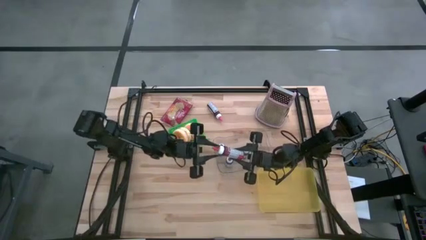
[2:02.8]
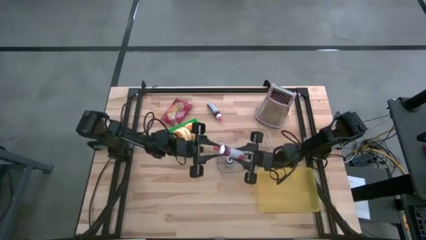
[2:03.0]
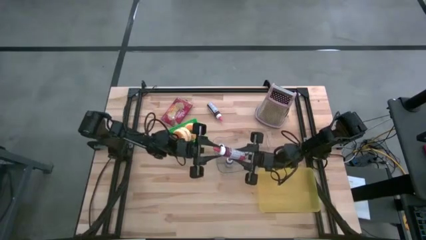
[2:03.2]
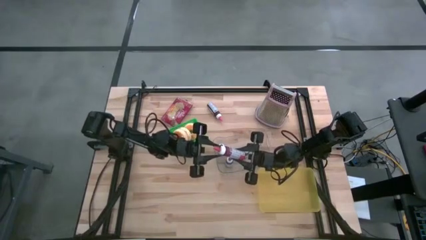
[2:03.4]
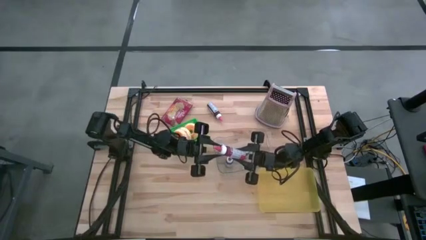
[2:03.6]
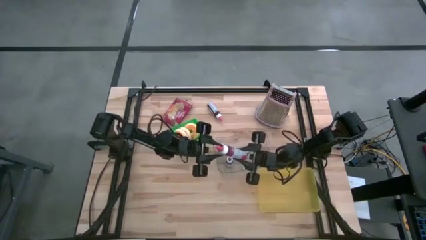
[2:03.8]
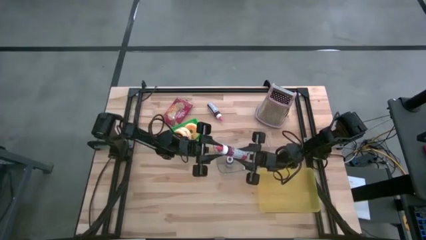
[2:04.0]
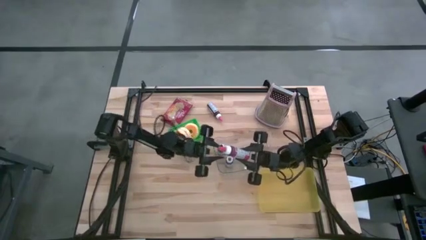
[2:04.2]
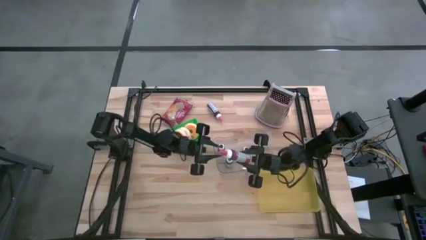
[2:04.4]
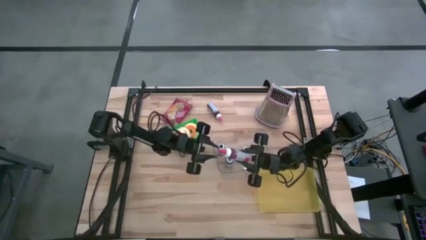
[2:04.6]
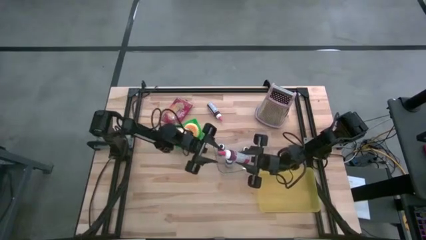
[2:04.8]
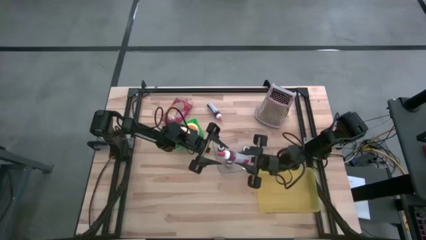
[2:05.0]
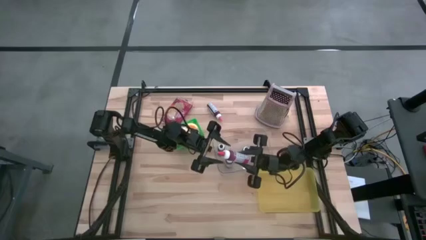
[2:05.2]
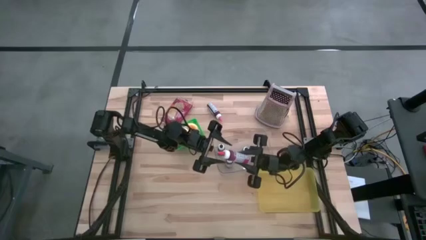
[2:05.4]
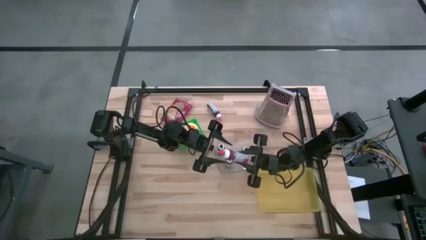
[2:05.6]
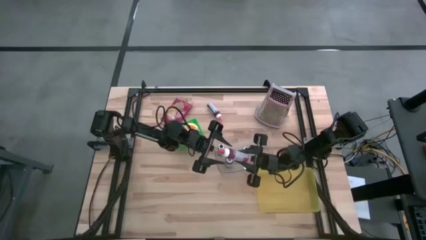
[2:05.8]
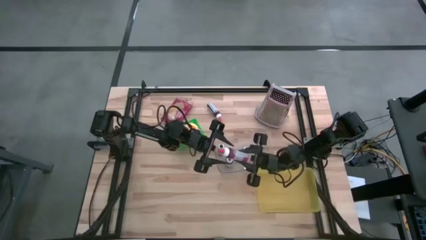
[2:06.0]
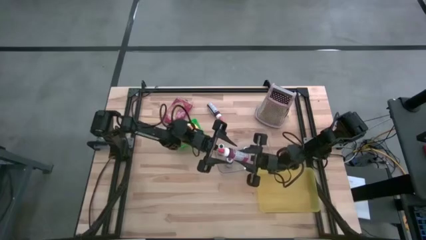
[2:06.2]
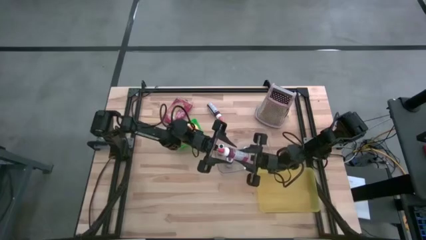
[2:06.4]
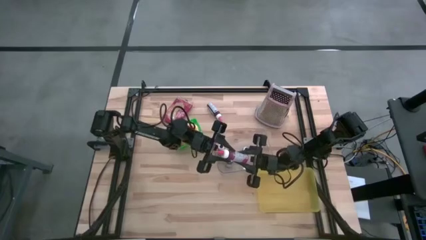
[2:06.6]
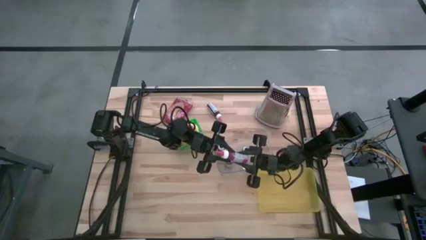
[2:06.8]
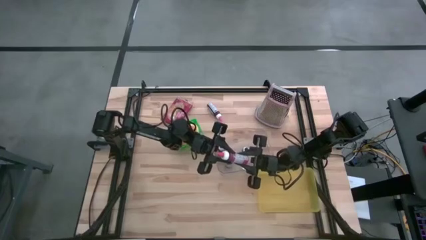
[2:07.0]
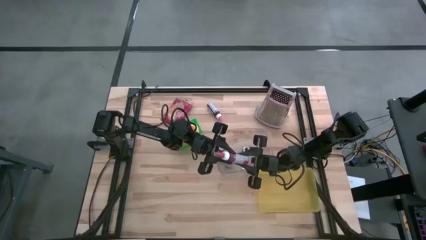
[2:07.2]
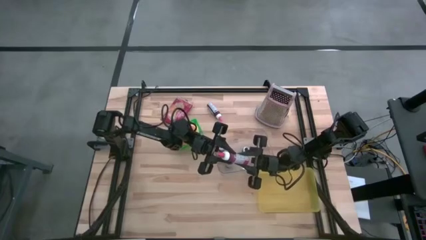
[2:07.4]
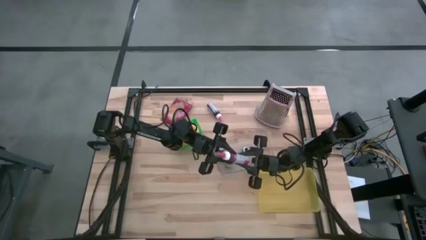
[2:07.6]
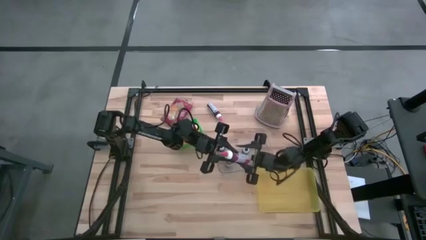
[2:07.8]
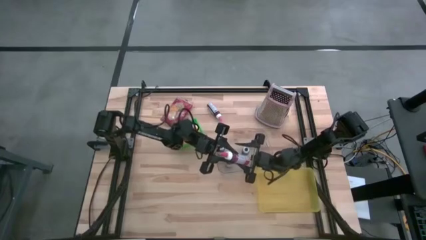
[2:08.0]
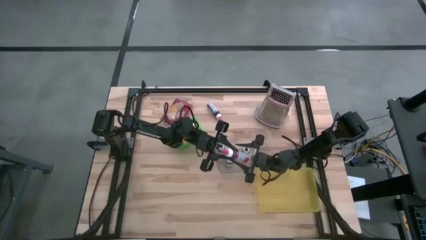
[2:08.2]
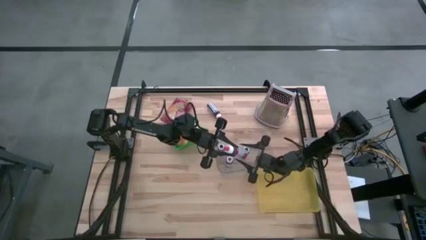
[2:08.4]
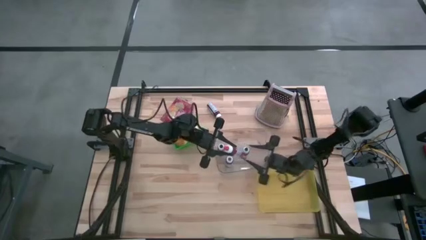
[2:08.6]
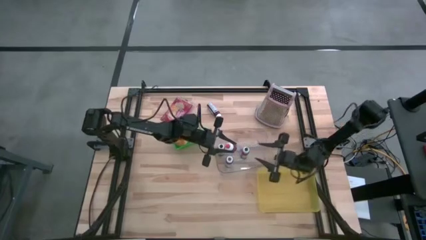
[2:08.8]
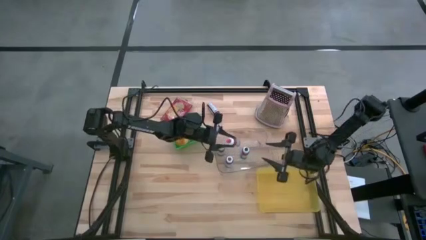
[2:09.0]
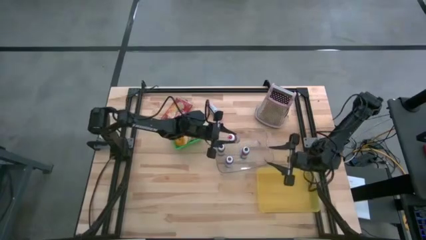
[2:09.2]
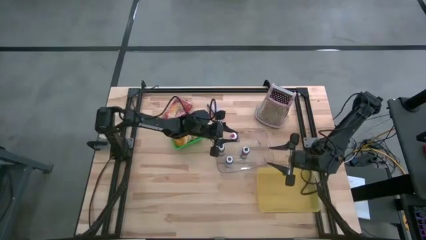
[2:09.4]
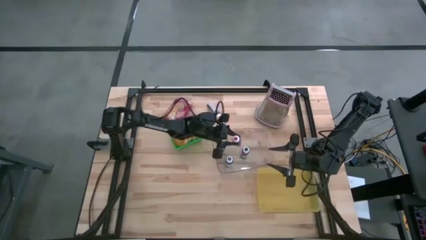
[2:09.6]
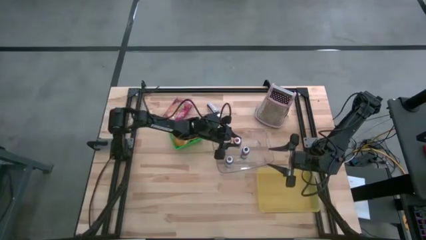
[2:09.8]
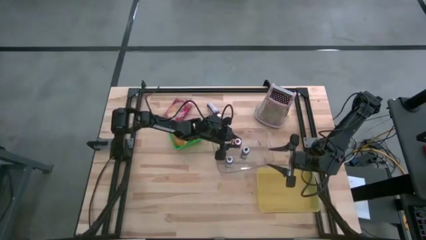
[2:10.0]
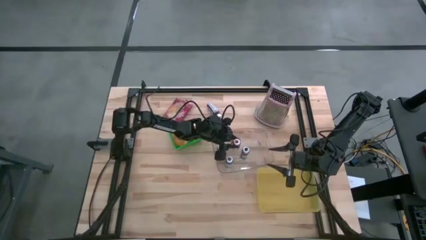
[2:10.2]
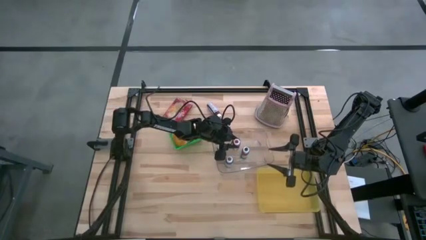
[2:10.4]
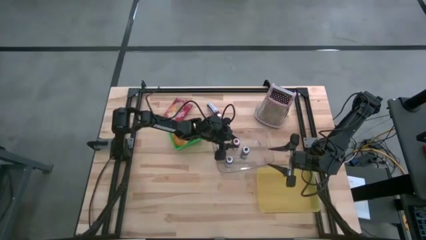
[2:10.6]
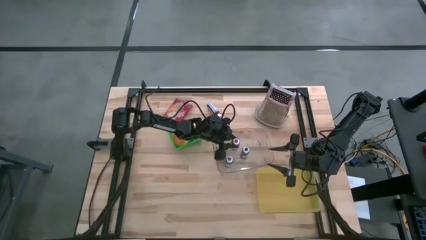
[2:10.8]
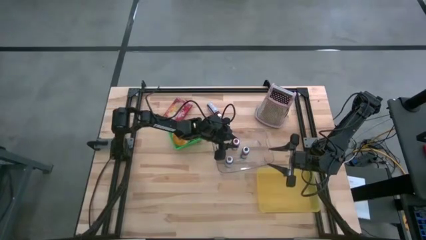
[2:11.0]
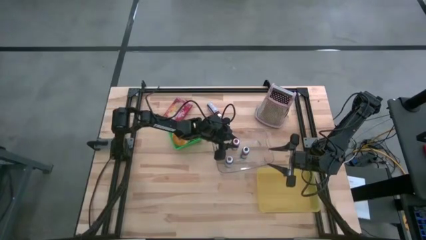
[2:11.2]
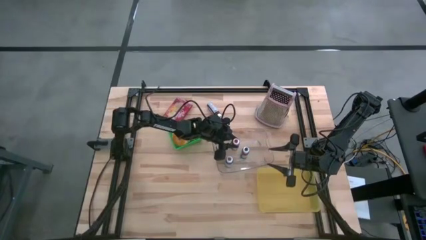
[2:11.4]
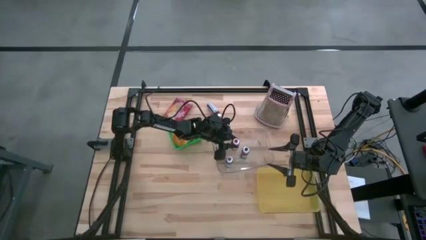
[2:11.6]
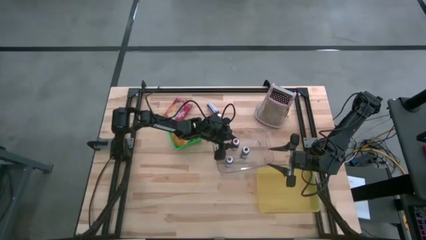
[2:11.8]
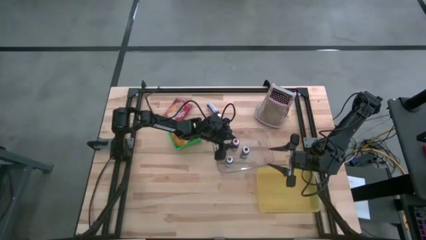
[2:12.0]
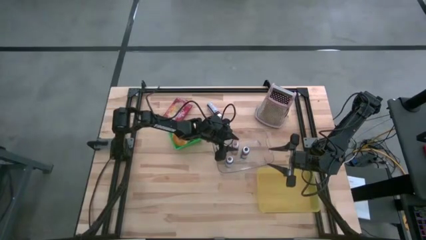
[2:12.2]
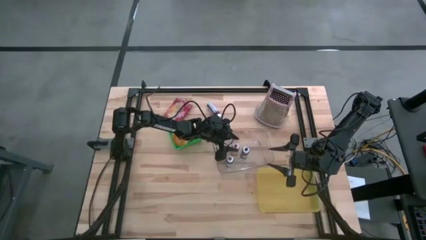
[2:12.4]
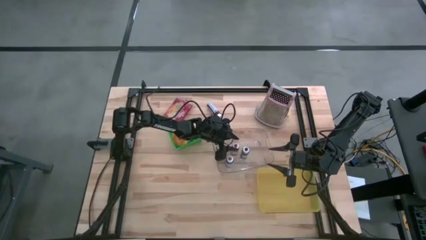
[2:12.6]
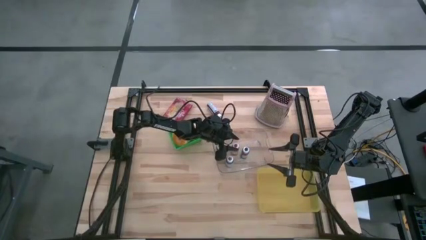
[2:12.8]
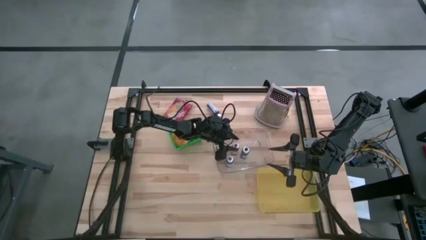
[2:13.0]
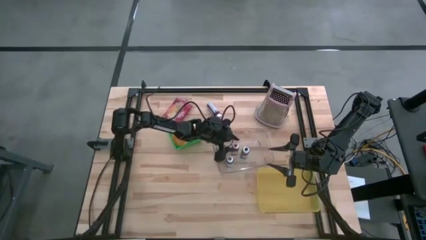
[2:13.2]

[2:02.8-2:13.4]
Task: Pick & Place Food Item
Put the red food coloring bottle into the transparent bin

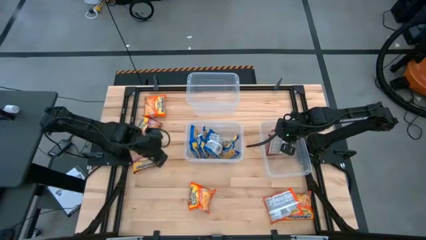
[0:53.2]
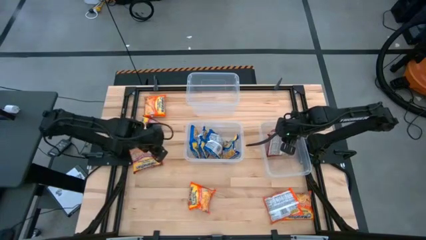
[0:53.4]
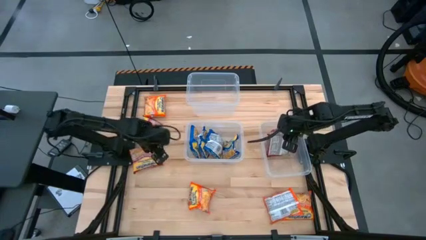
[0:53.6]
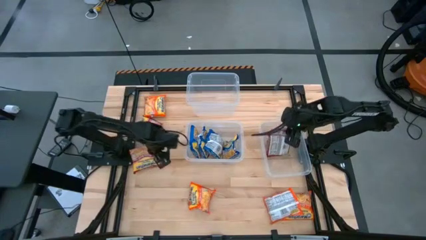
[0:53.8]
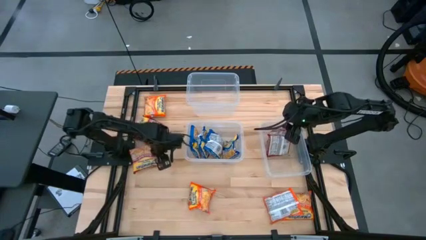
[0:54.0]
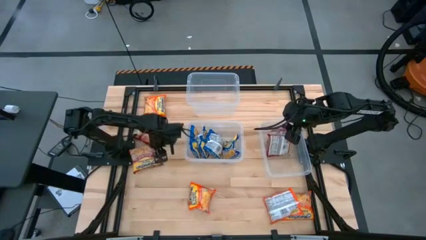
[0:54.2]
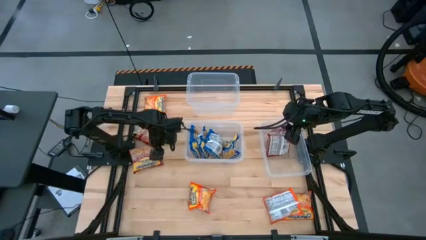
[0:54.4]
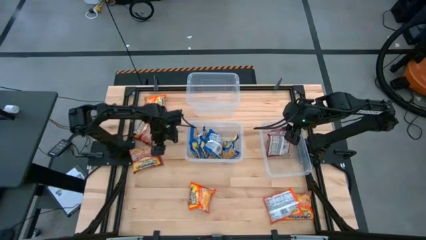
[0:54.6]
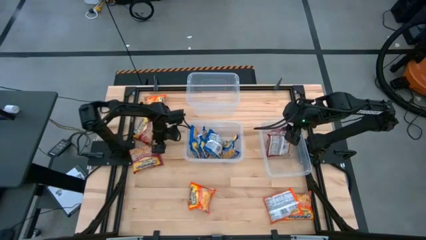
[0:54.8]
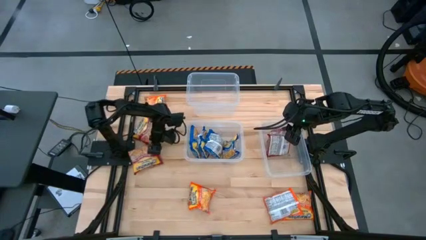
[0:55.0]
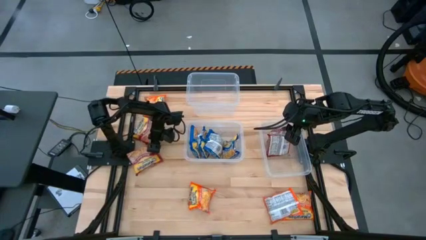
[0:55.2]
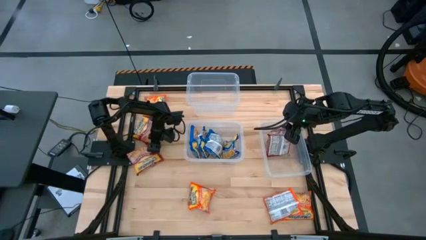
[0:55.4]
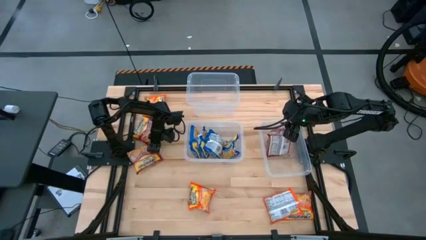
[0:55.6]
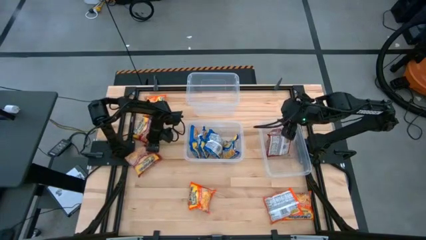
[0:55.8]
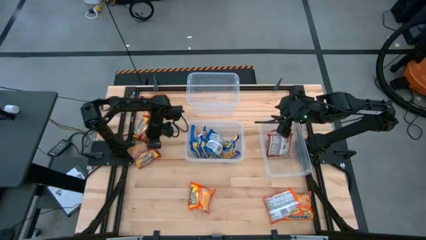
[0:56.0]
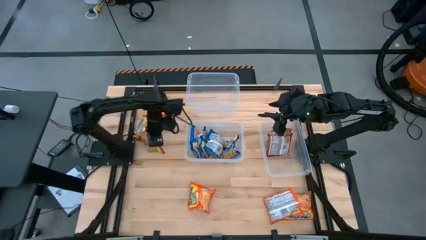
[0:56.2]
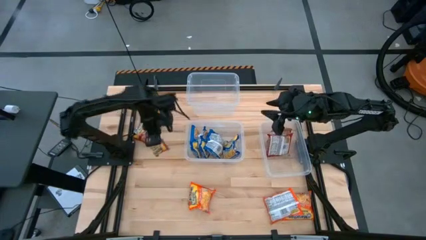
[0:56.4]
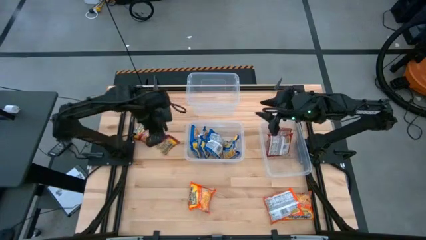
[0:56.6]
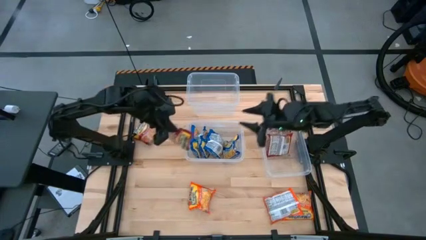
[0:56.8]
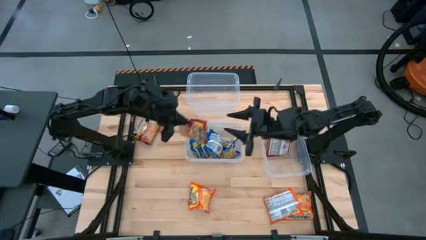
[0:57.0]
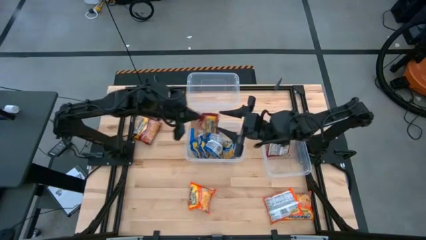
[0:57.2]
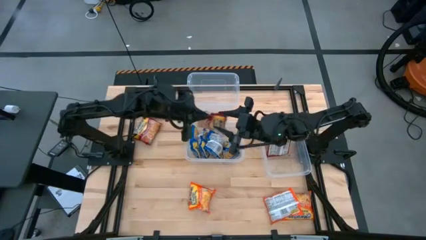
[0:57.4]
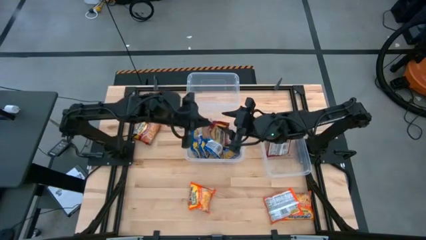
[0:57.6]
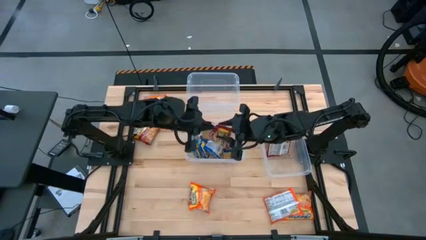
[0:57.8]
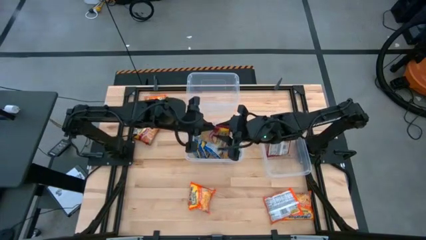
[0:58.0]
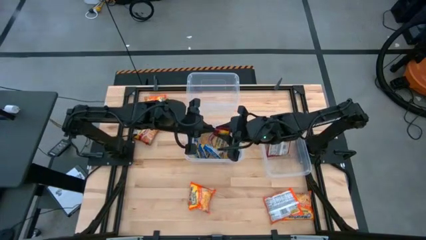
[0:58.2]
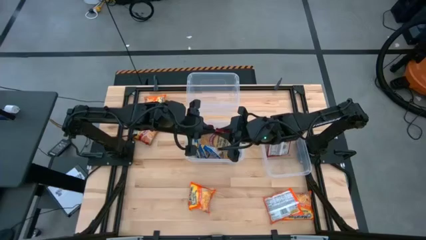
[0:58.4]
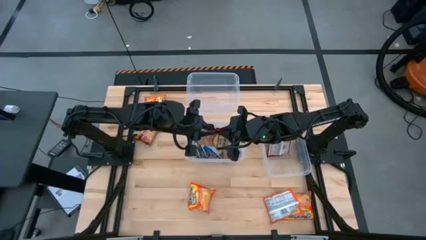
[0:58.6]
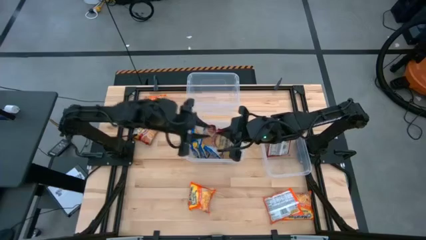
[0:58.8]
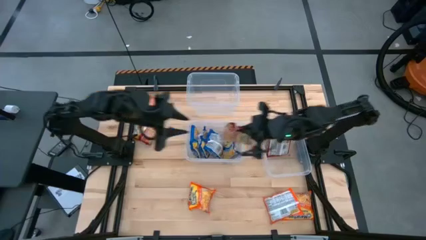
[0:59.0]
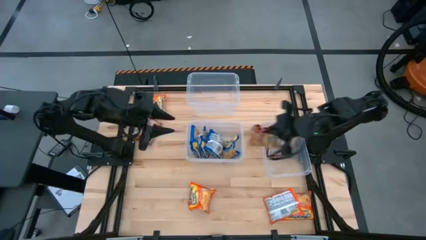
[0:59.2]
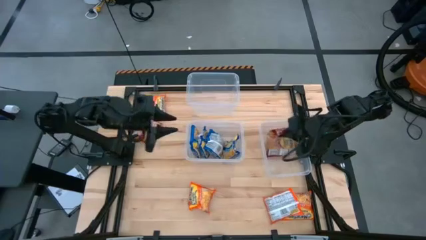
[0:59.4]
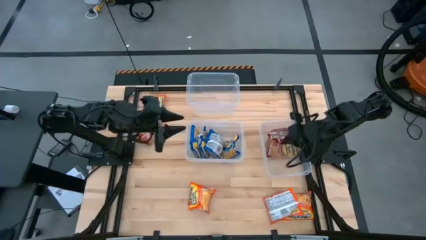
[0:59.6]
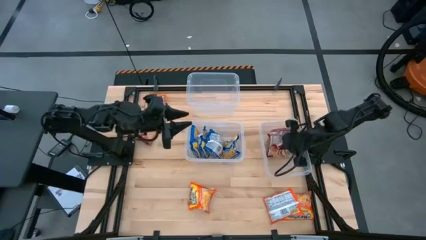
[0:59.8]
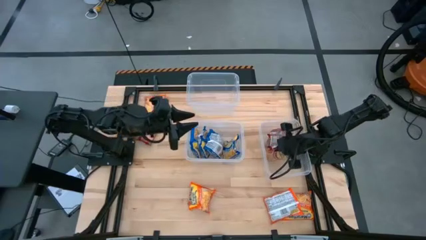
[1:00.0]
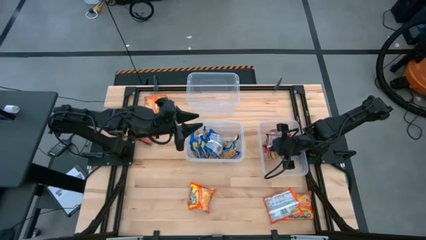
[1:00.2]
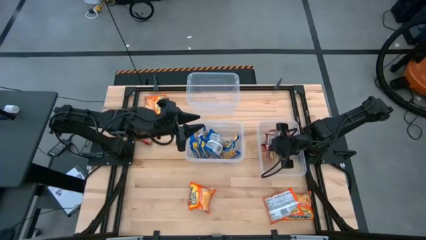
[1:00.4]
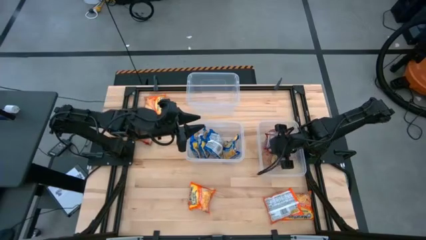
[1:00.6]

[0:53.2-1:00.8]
Task: Sort Maruchan noodles
Put the red noodle pack into the bottom right transparent bin
